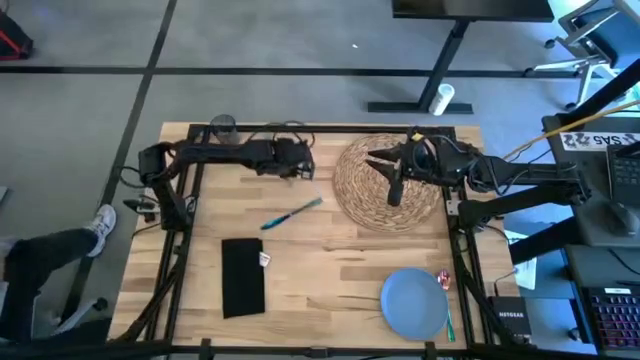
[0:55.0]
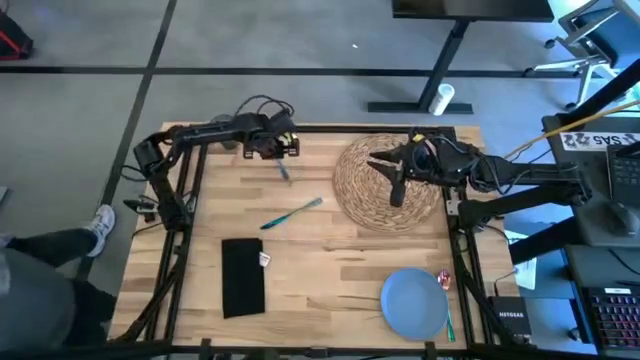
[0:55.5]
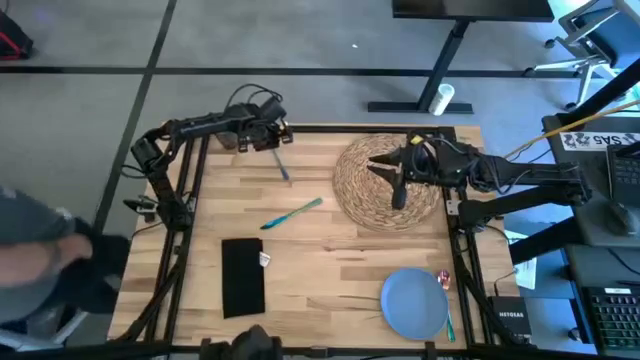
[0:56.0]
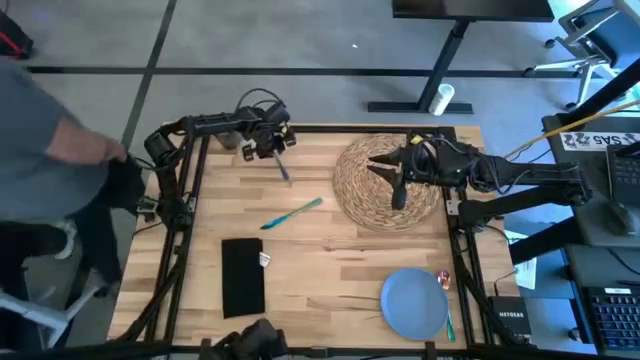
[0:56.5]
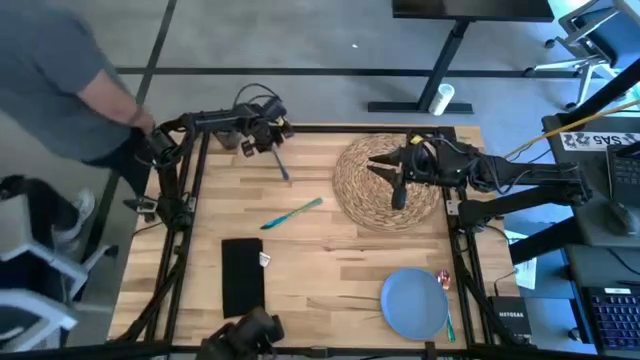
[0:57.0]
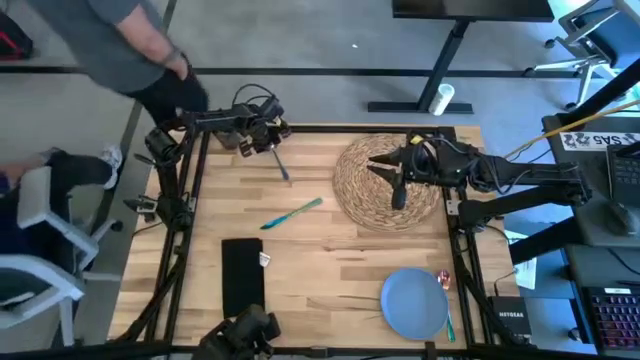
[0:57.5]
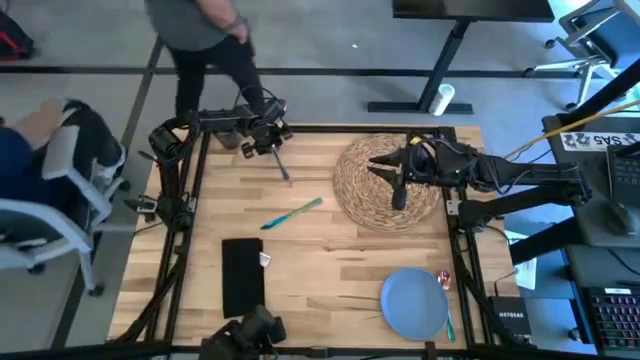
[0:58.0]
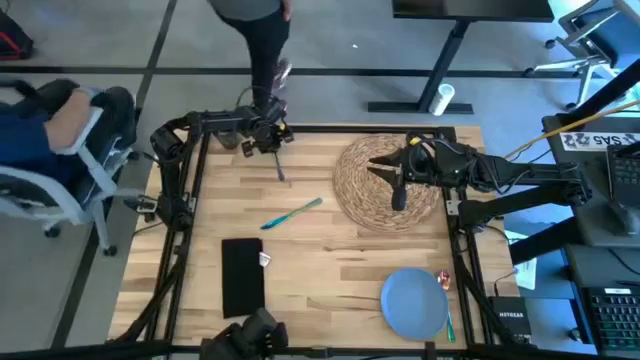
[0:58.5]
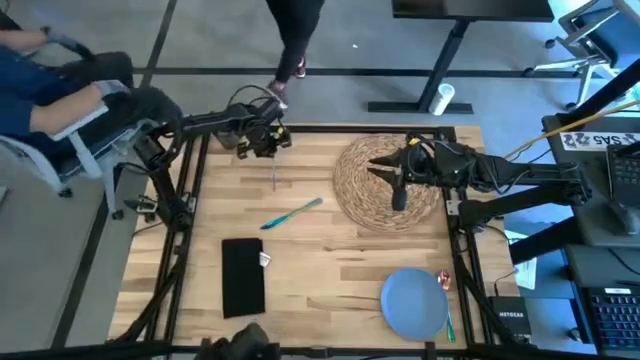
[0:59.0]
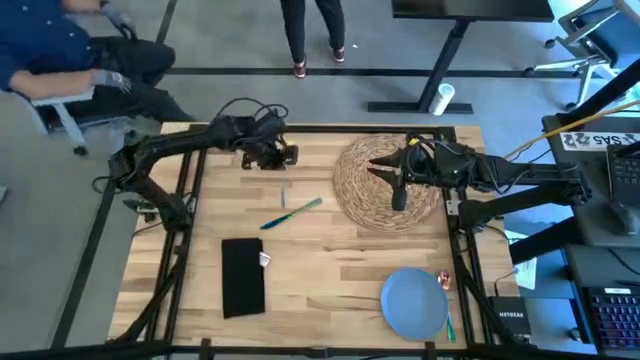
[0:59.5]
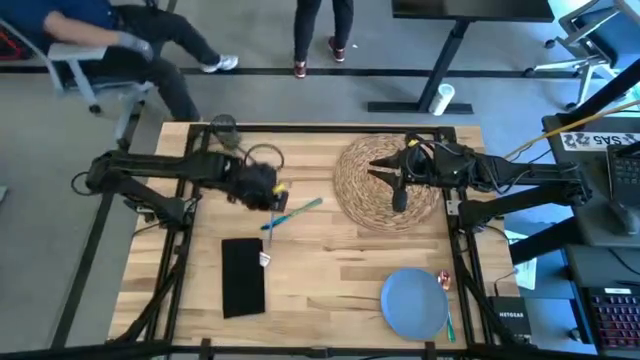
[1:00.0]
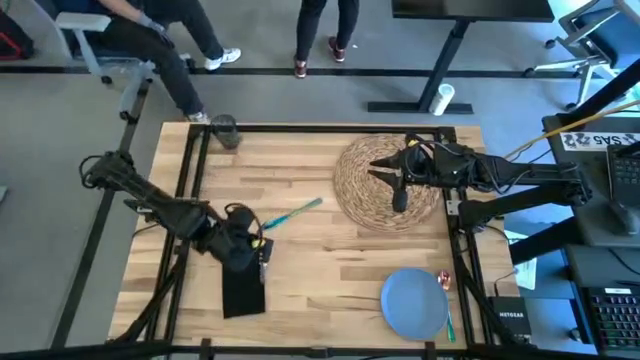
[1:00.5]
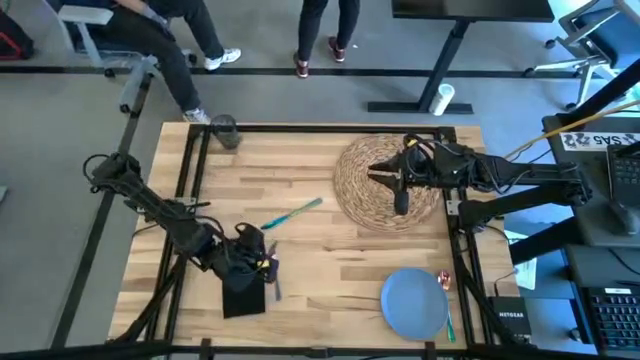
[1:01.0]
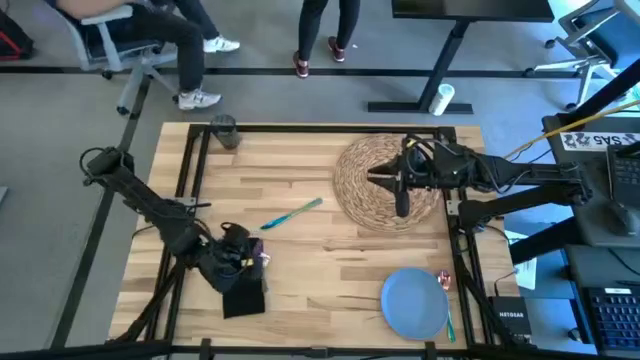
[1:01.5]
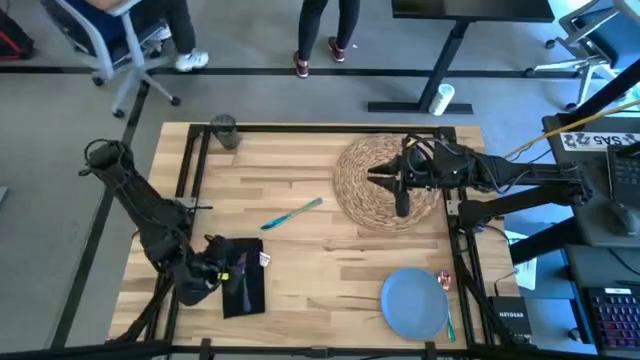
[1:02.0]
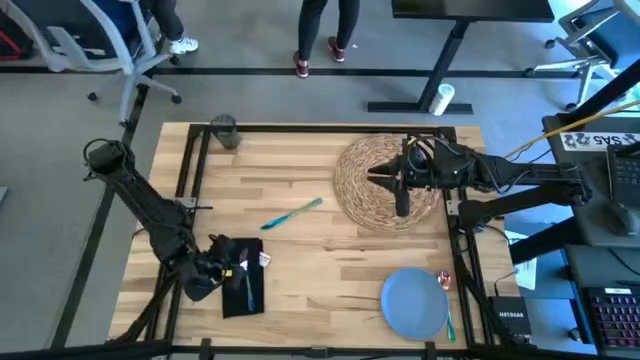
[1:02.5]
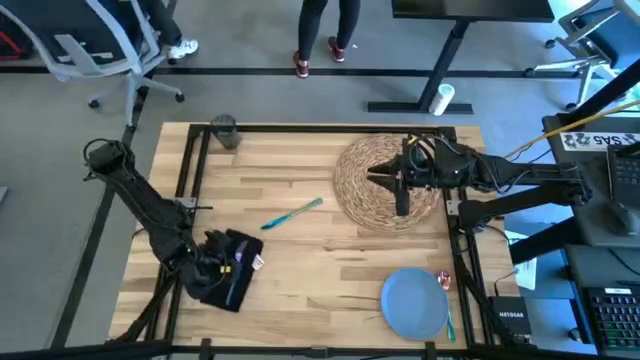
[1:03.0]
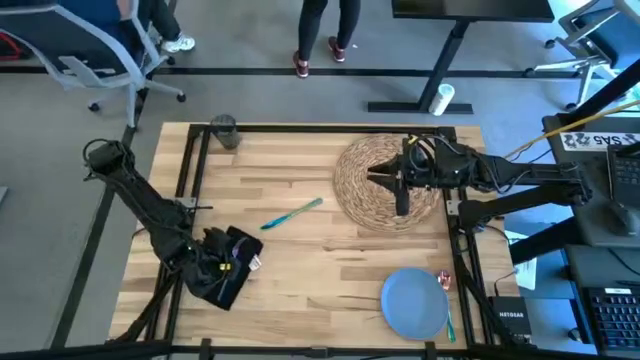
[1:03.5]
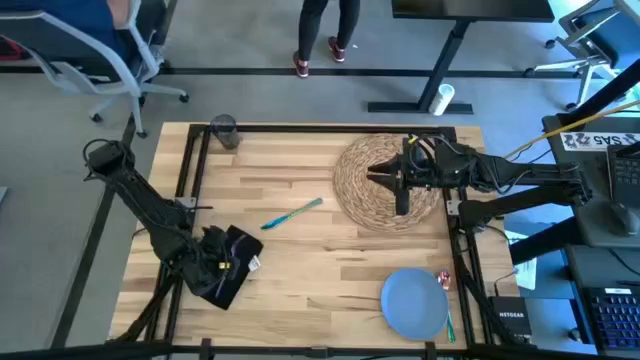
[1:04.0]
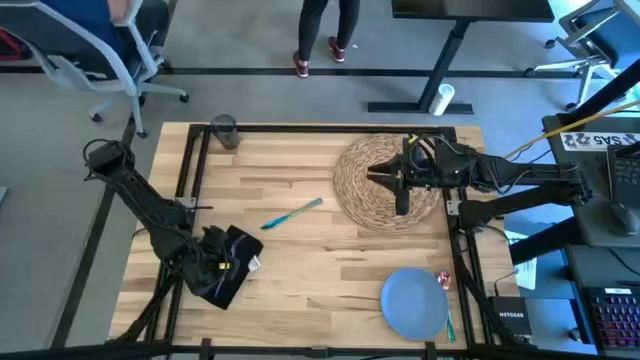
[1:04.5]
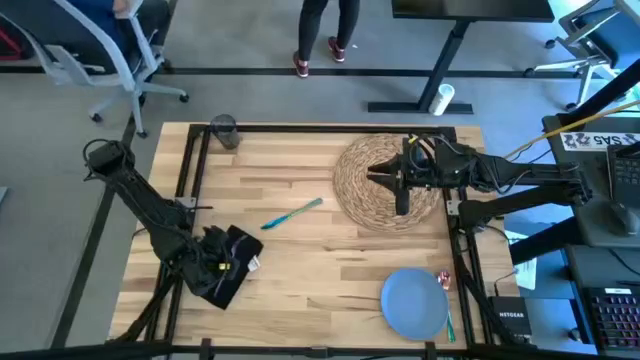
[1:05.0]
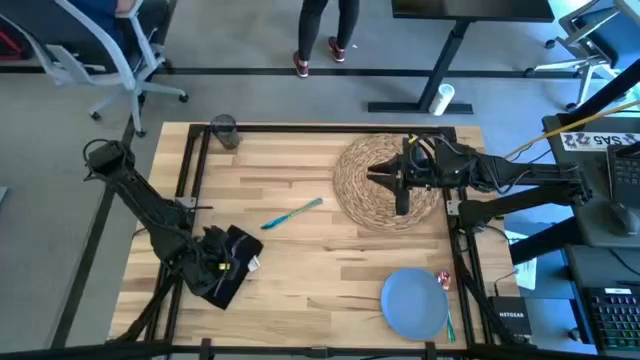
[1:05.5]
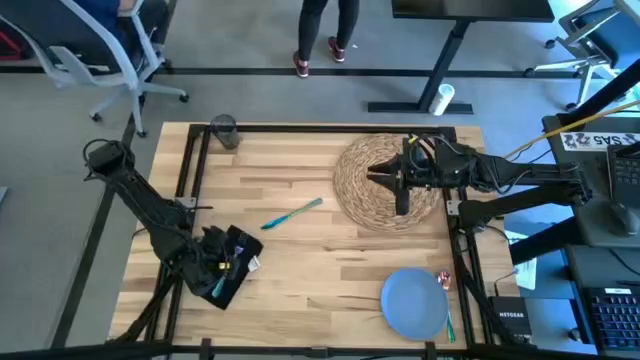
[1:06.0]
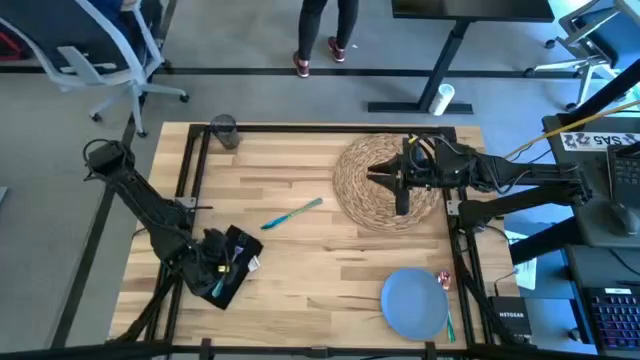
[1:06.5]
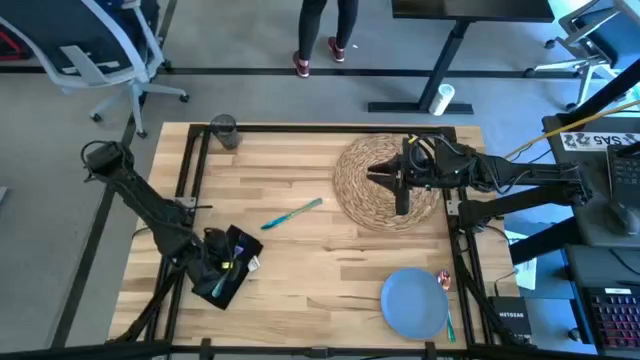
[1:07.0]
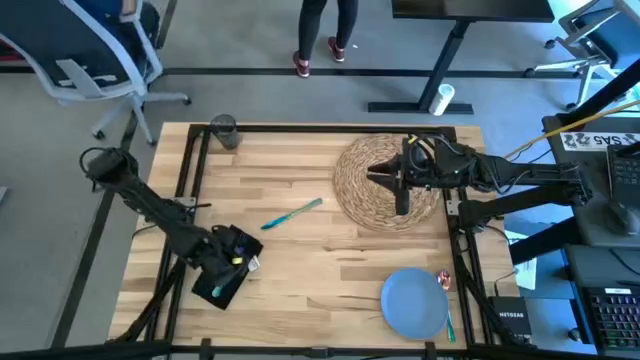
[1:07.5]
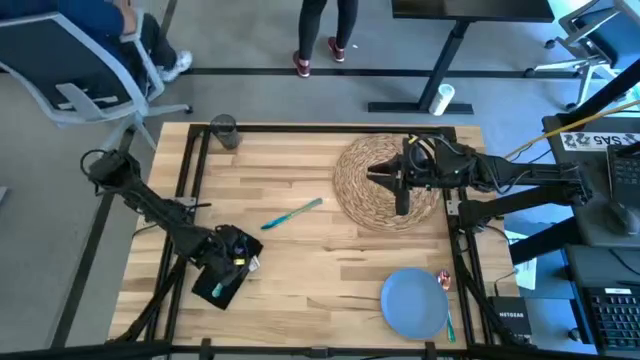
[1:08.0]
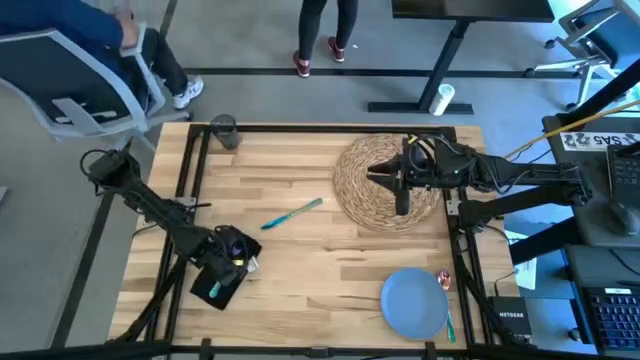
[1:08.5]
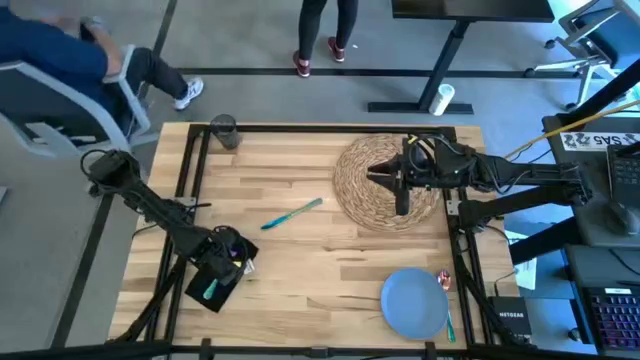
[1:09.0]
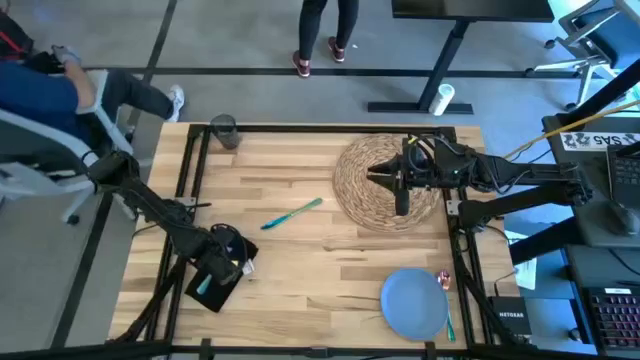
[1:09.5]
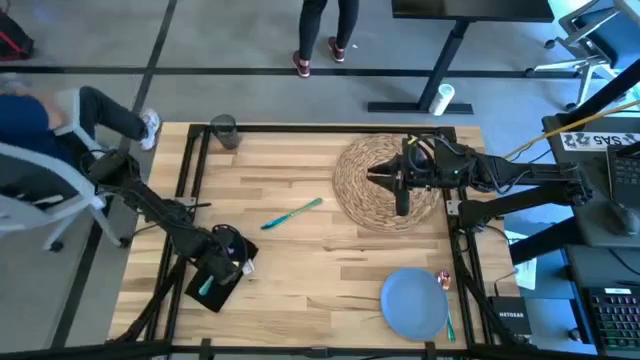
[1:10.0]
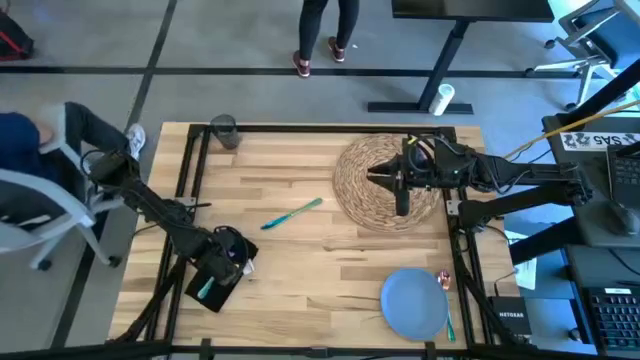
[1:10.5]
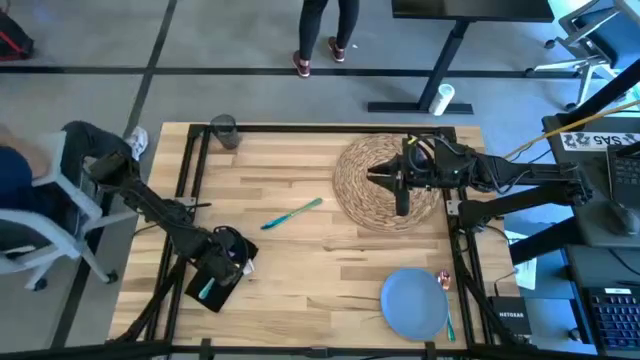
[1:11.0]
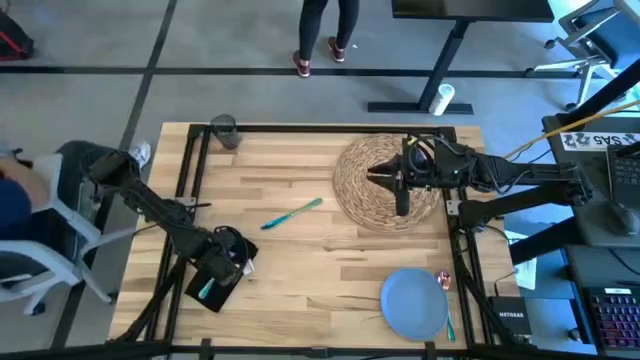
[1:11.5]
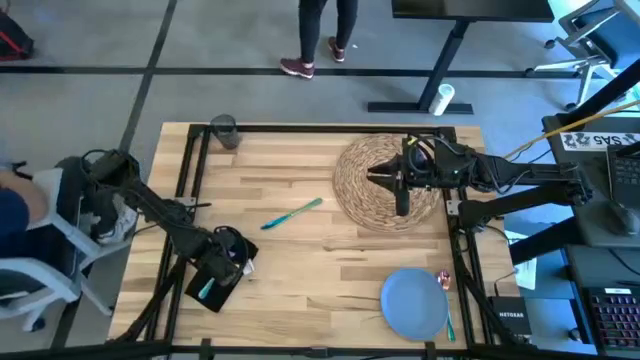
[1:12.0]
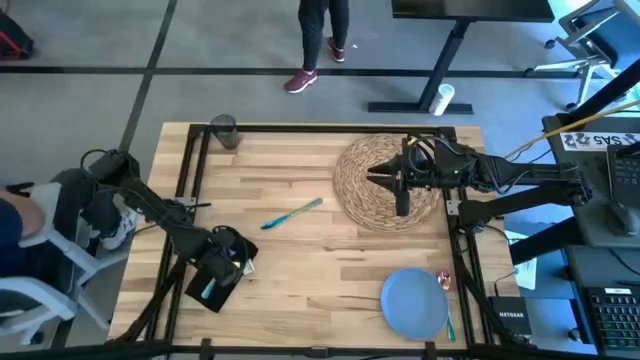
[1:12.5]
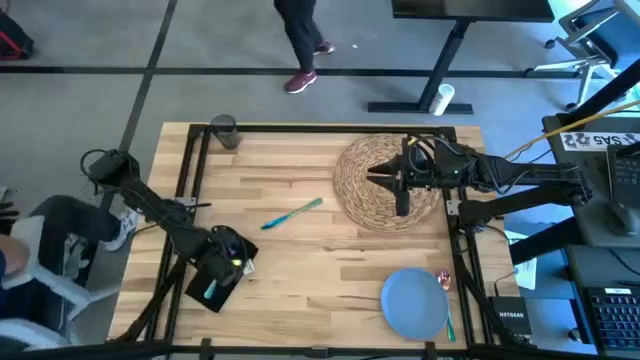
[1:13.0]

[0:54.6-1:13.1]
Task: Set table place
Put the blue fork on the black table napkin

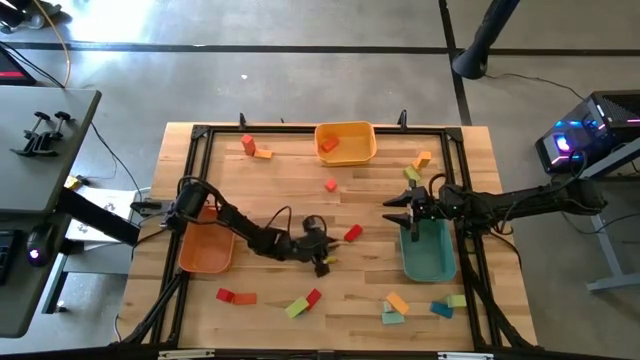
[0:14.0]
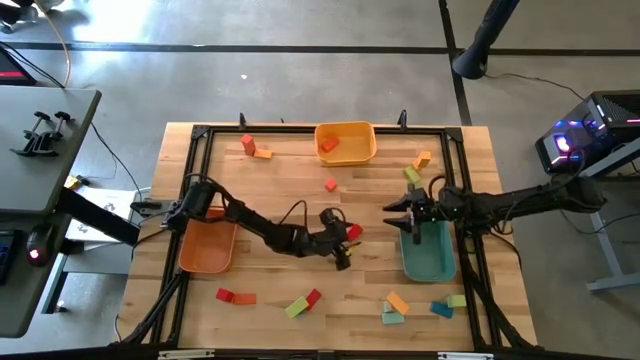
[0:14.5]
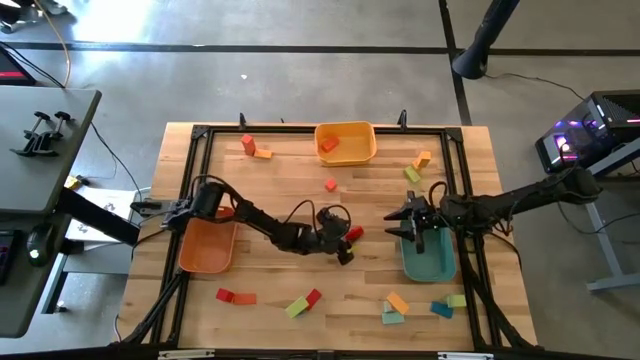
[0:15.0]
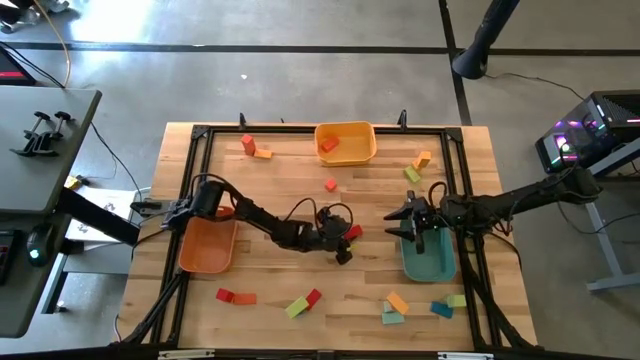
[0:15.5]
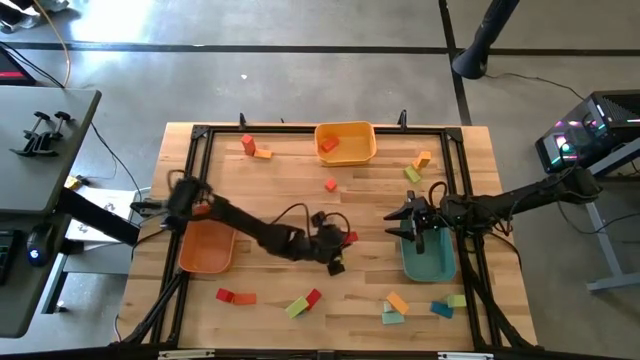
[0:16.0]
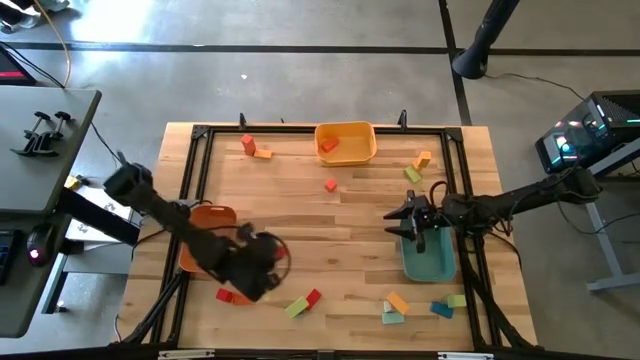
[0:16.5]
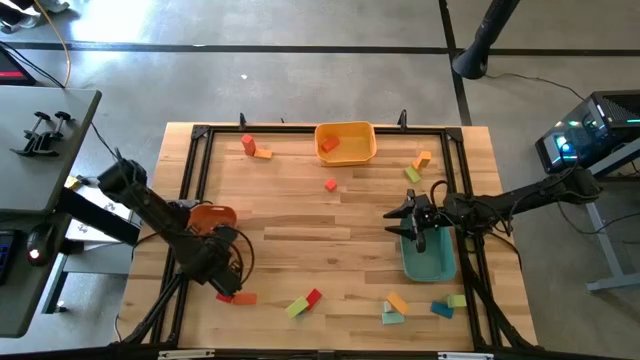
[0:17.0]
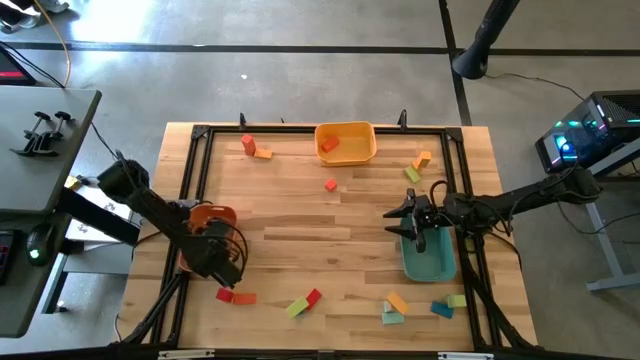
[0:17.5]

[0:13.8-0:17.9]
Task: Sort blocks by size
Put the red medium block into the orange bin
